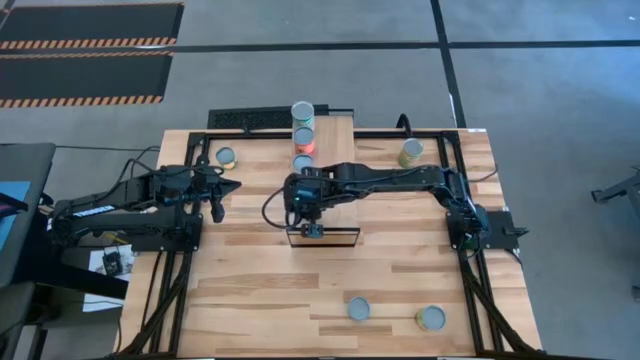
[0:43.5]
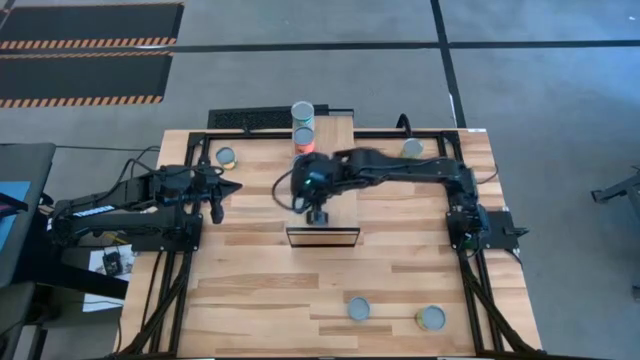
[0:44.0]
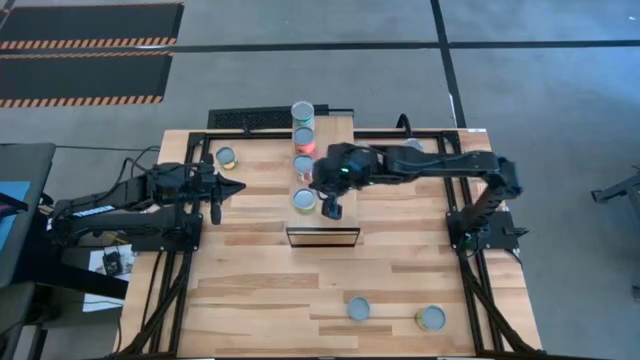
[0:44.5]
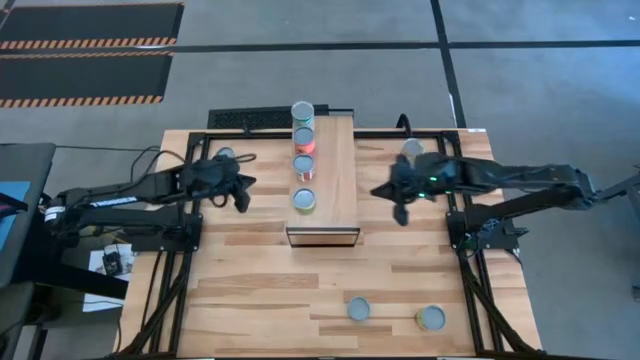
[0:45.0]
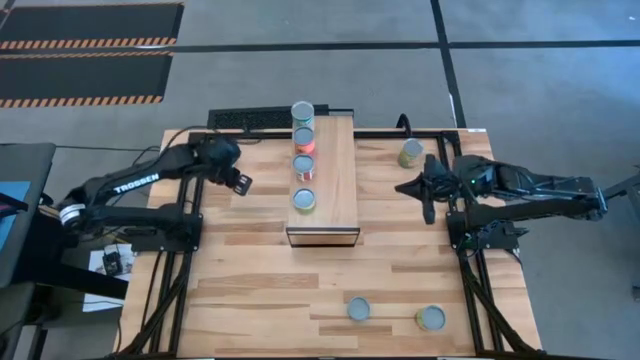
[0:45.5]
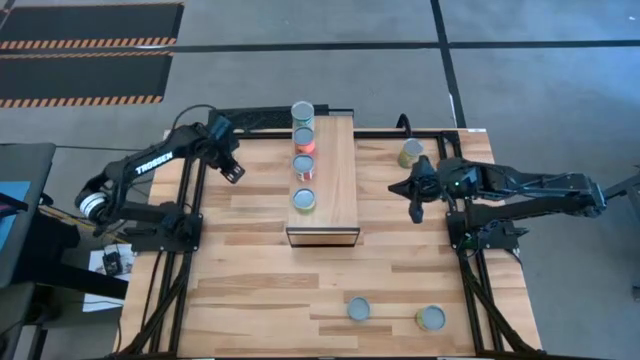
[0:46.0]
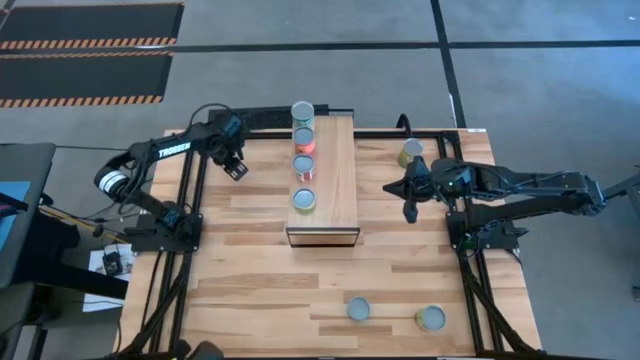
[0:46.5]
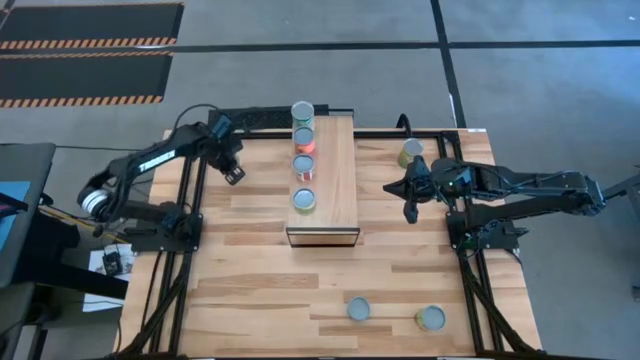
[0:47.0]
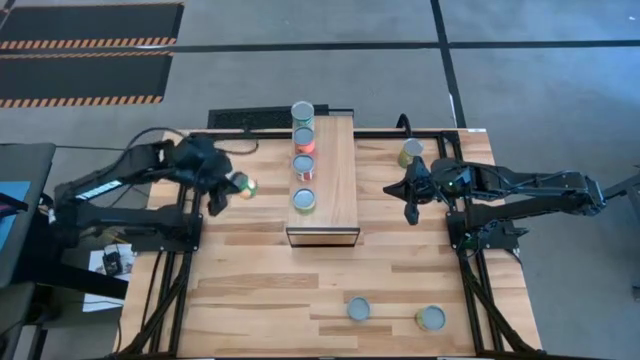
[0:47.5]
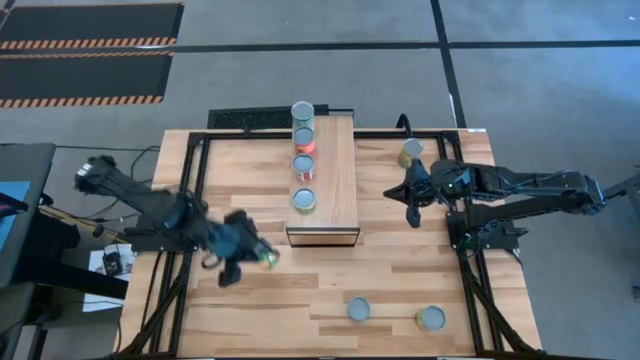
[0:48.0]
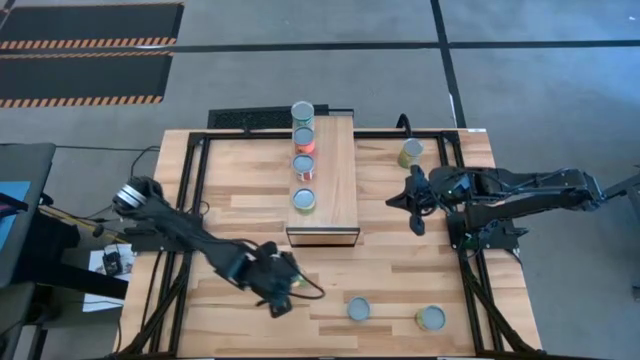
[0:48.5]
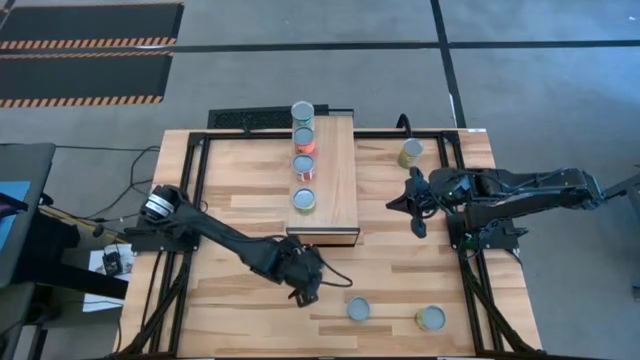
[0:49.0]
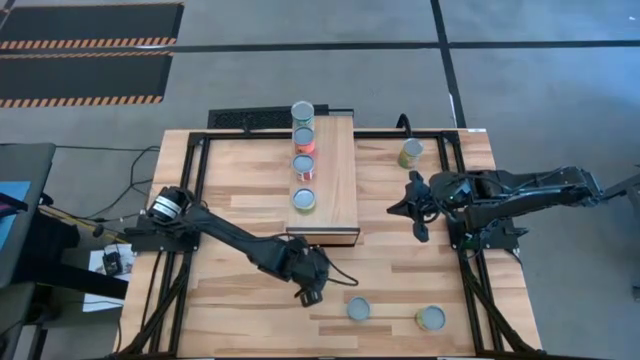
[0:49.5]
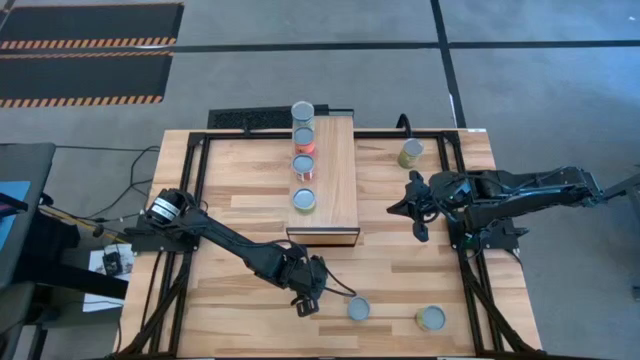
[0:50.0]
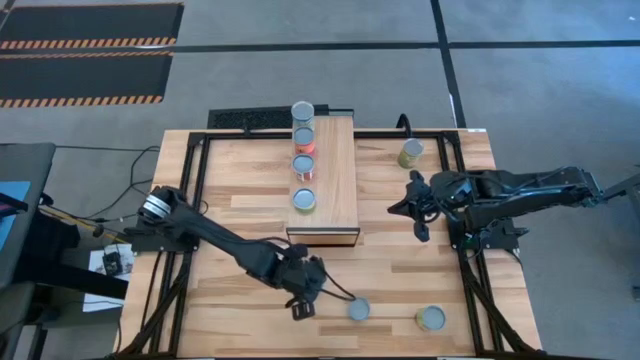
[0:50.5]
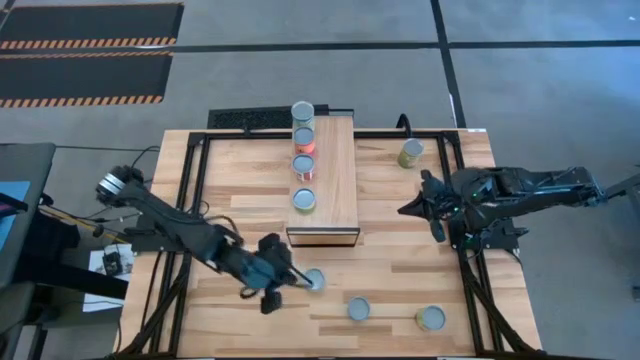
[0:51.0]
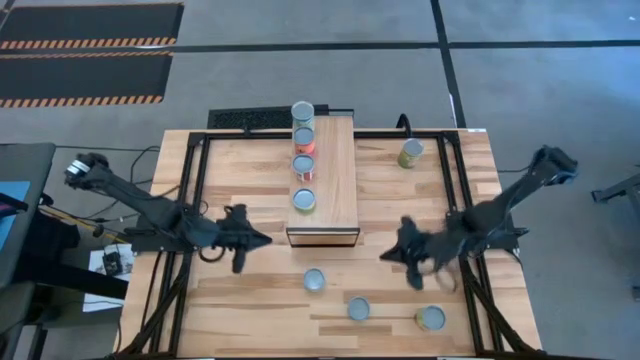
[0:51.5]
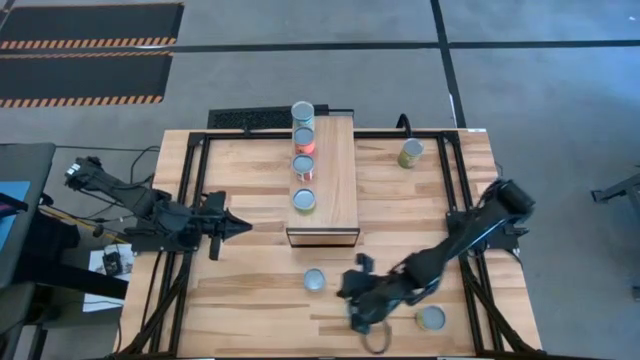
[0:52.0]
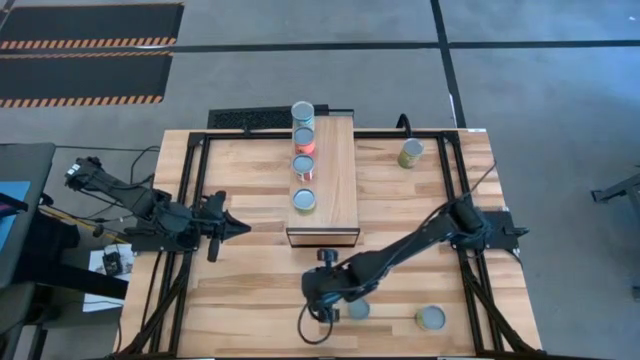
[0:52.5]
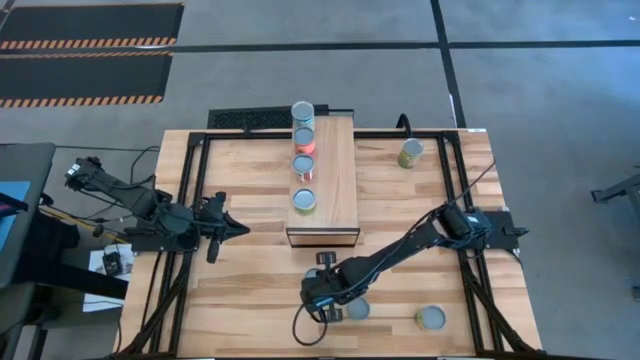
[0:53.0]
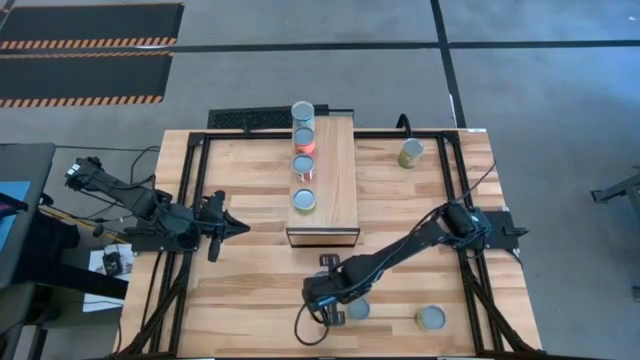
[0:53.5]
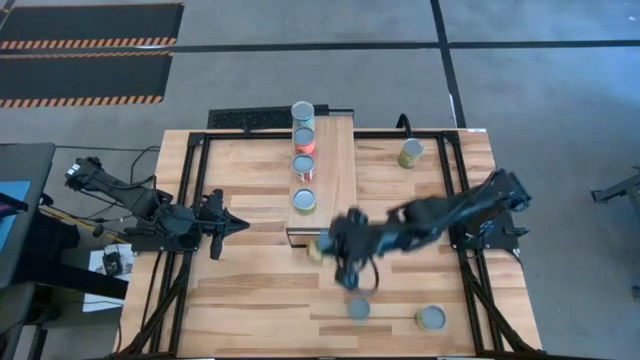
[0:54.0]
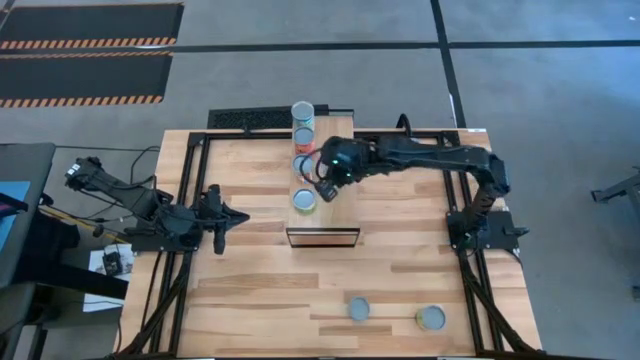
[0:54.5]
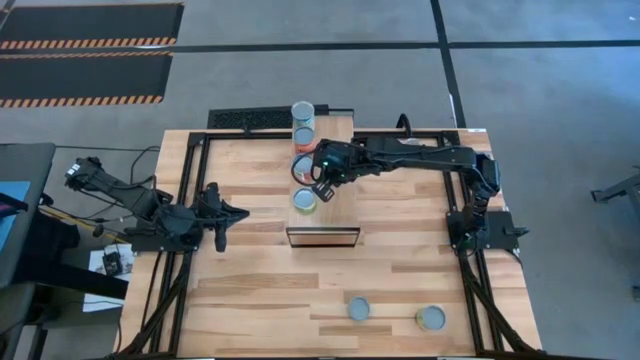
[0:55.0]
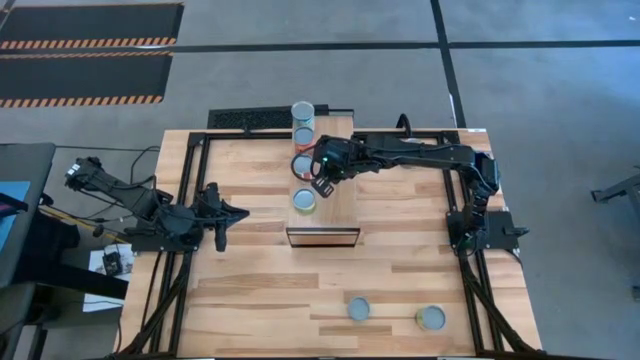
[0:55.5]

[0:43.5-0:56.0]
Task: Pick and place cans onto a shelf
Put the canned sliced peaches on the shelf

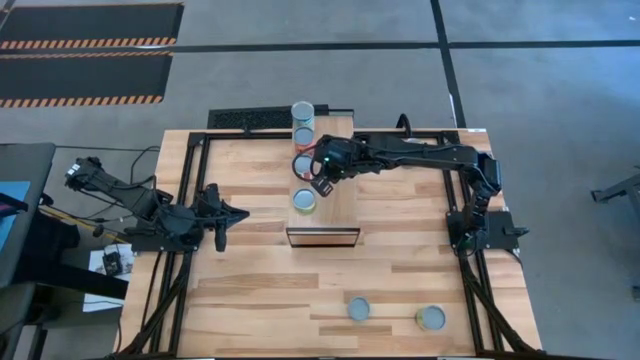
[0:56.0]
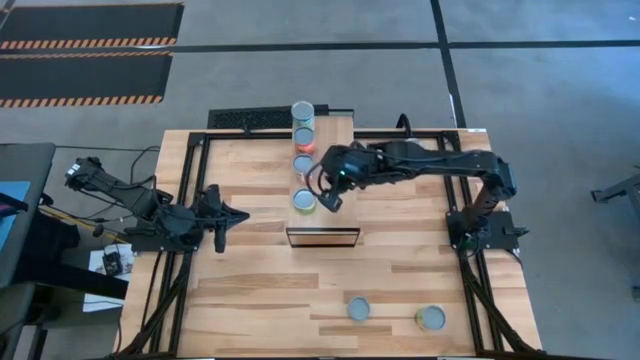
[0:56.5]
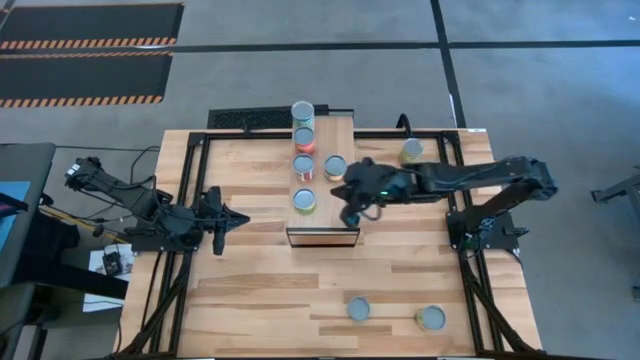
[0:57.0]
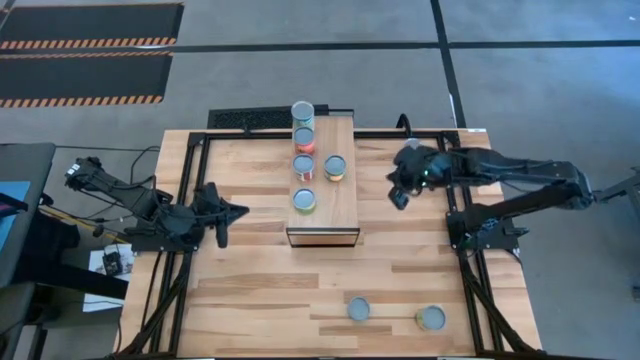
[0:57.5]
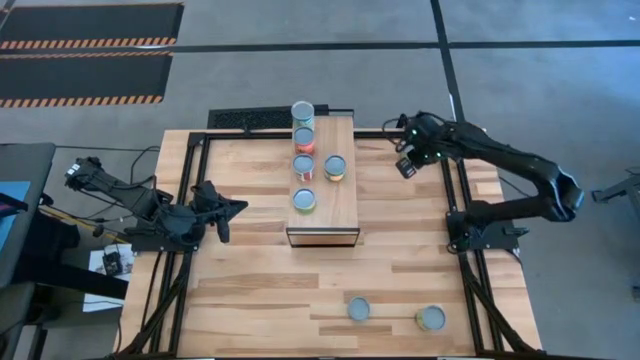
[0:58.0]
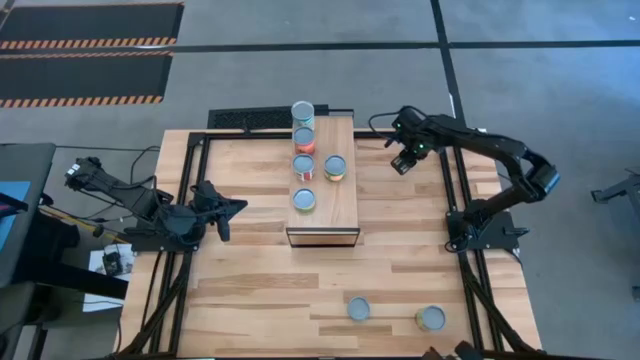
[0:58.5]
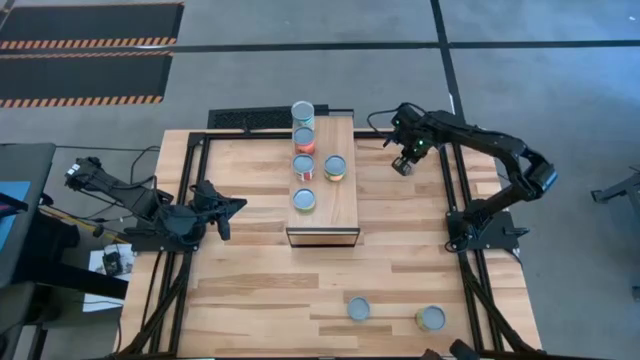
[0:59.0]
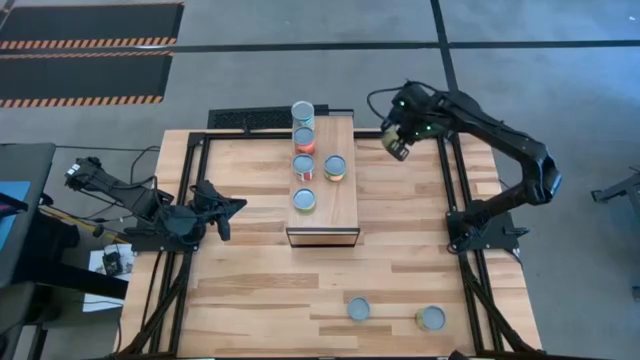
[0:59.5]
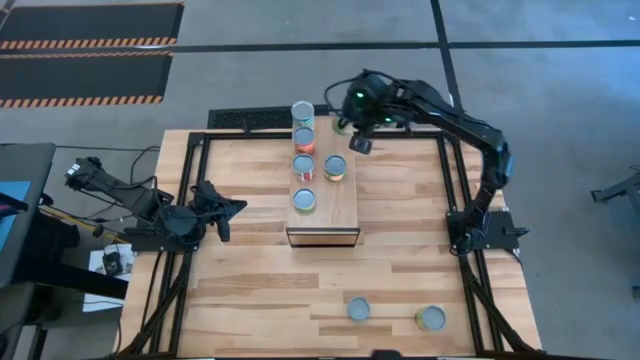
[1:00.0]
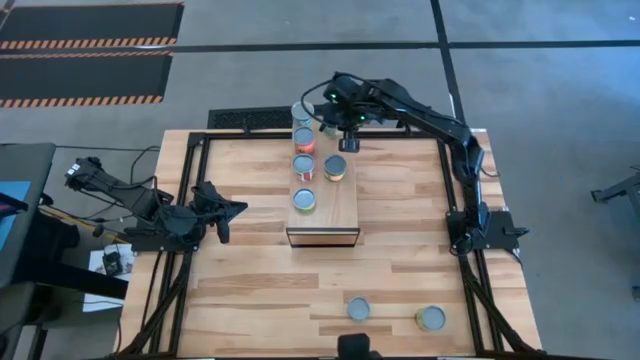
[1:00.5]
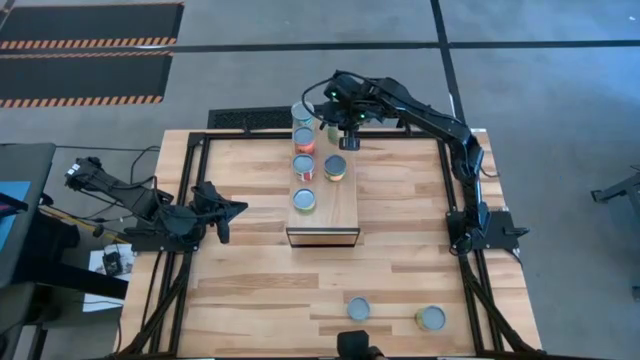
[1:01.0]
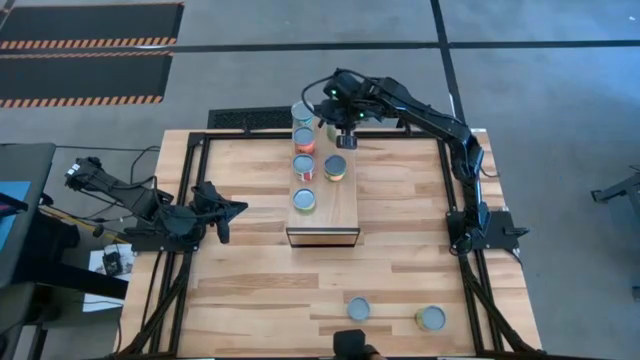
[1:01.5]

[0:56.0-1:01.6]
Put the canned oranges on the shelf

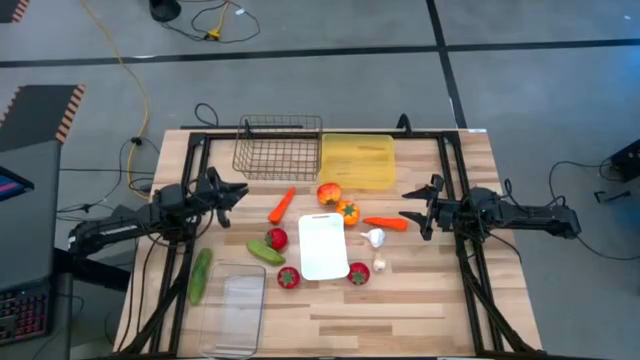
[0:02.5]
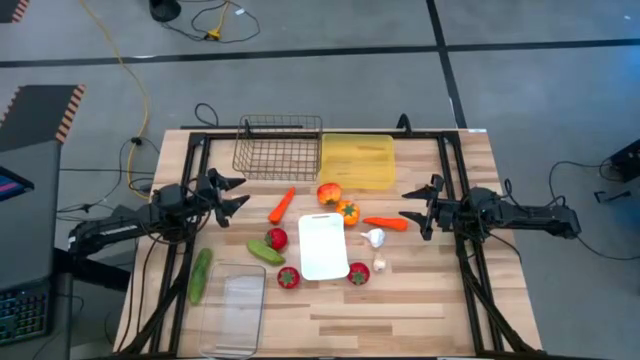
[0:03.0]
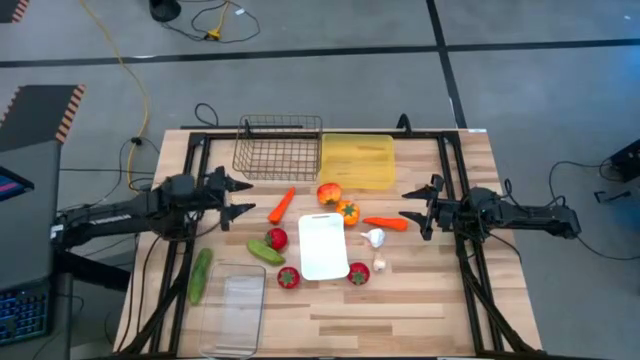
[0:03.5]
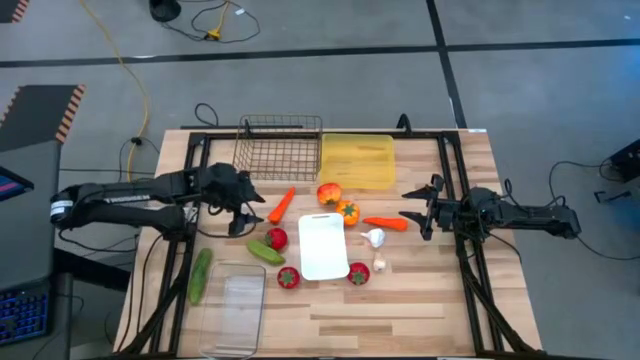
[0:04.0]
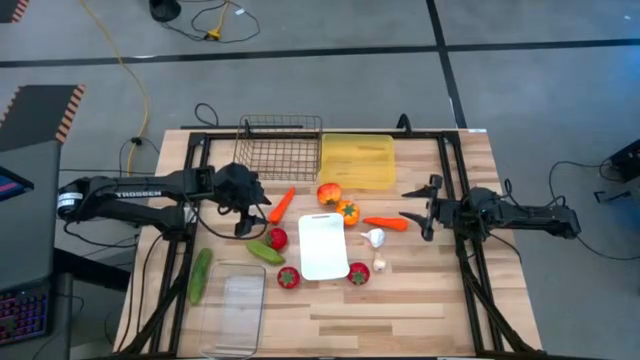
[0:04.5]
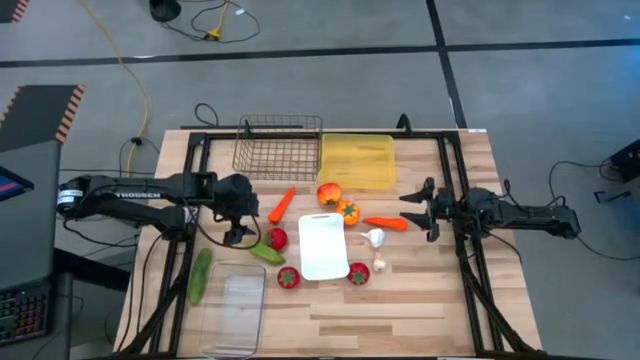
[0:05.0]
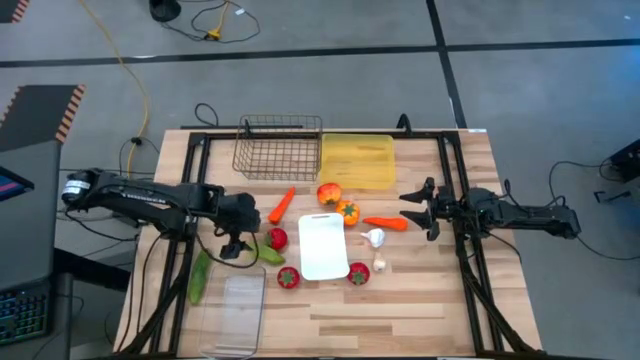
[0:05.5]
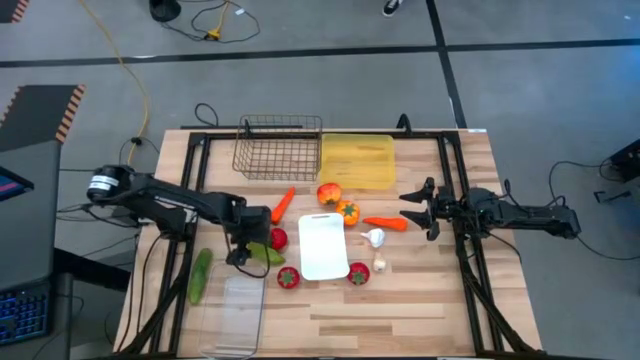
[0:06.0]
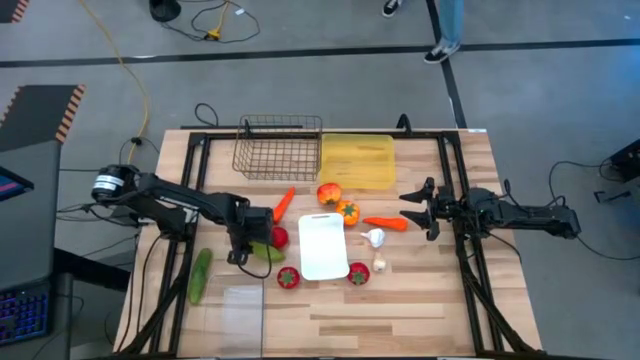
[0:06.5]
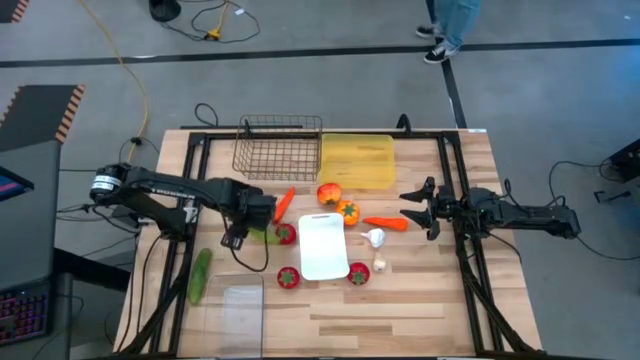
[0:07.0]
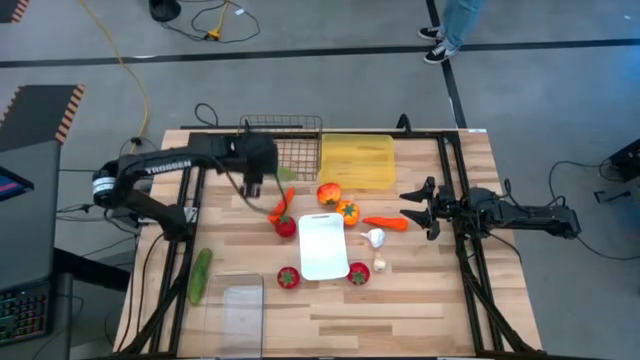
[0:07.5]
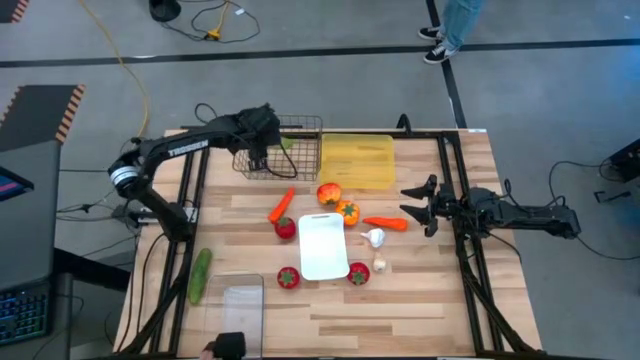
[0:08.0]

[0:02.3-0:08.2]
Task: Sort produce into baskets
Put the right cucumber into the wire basket
